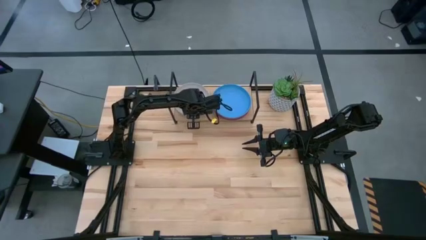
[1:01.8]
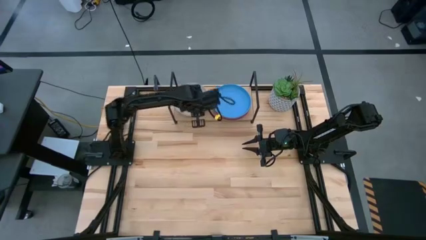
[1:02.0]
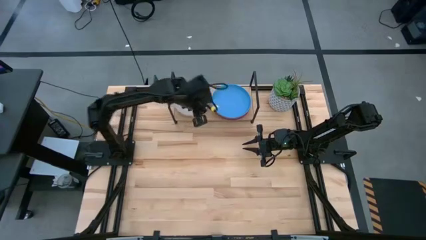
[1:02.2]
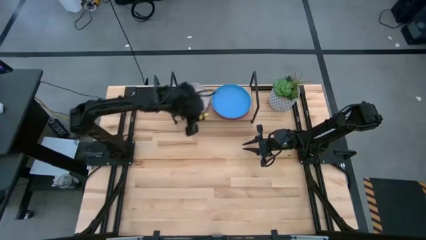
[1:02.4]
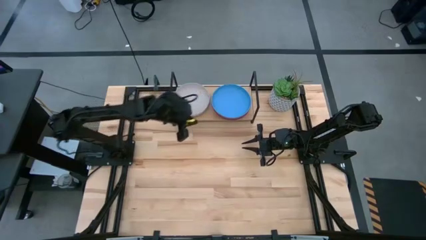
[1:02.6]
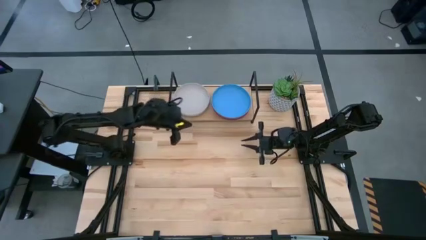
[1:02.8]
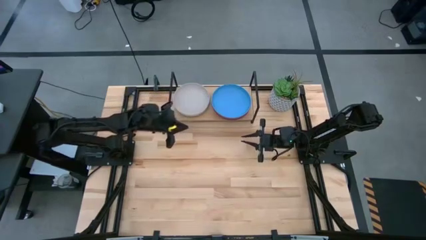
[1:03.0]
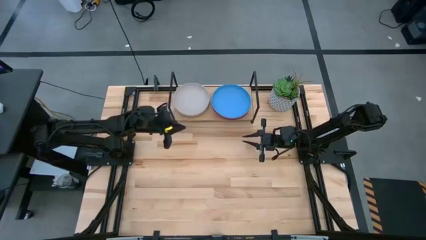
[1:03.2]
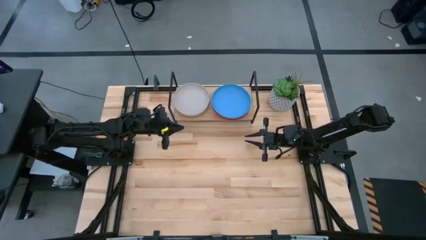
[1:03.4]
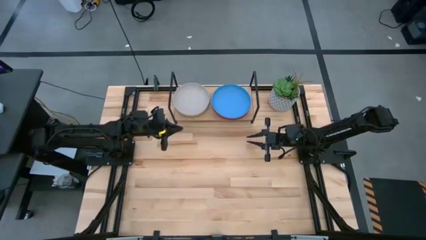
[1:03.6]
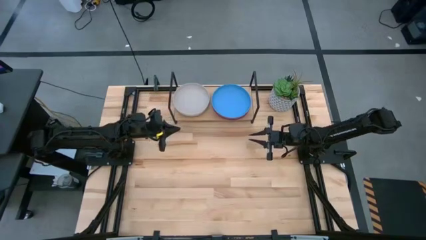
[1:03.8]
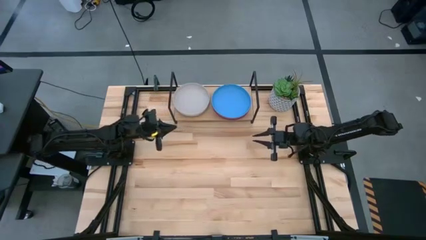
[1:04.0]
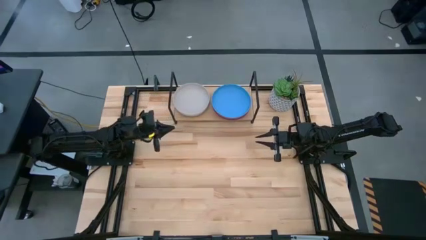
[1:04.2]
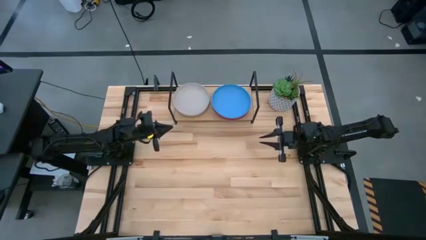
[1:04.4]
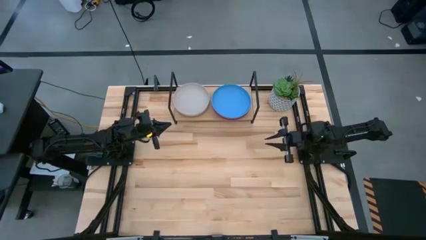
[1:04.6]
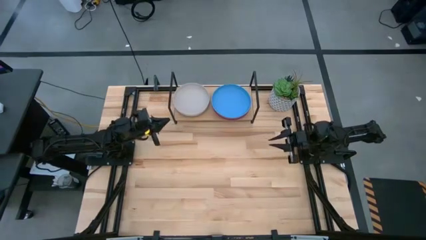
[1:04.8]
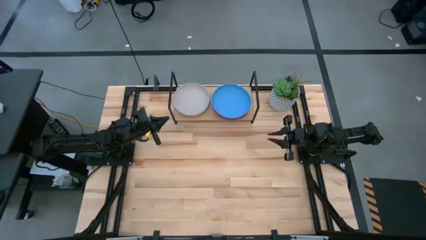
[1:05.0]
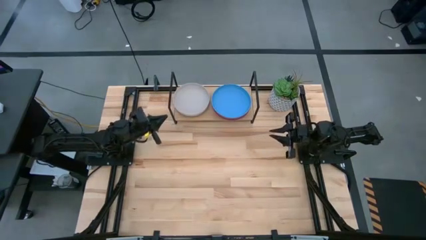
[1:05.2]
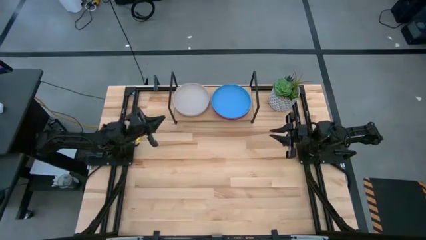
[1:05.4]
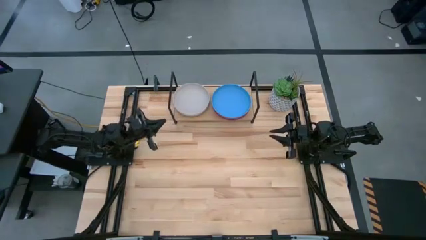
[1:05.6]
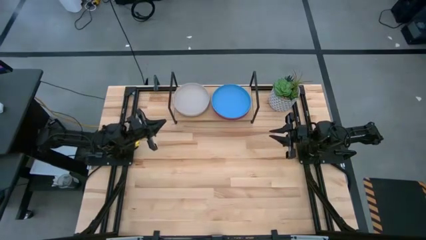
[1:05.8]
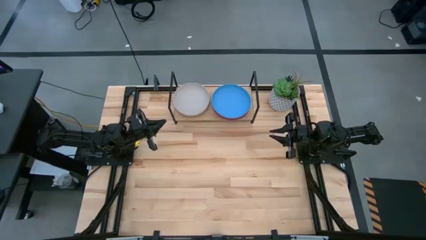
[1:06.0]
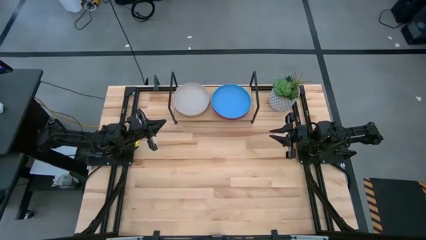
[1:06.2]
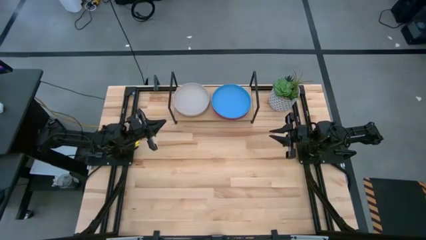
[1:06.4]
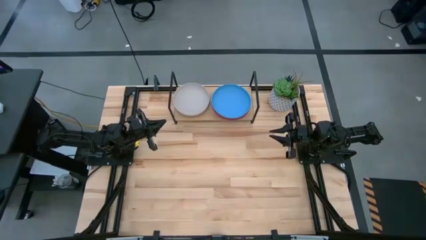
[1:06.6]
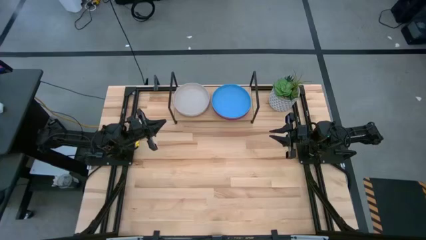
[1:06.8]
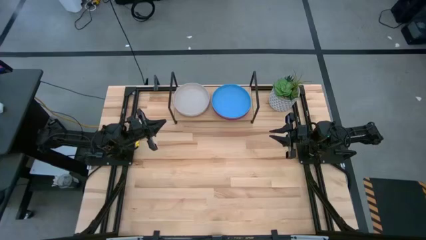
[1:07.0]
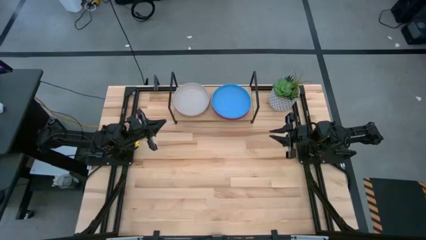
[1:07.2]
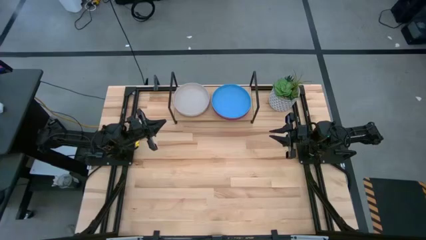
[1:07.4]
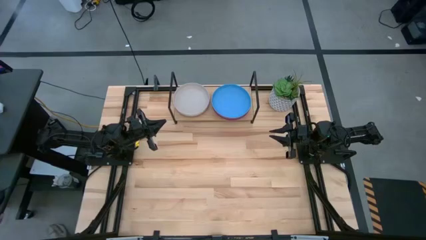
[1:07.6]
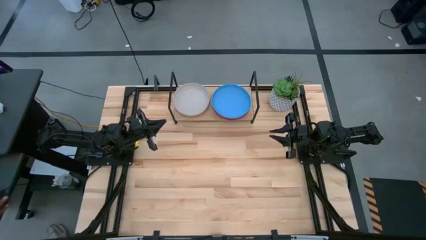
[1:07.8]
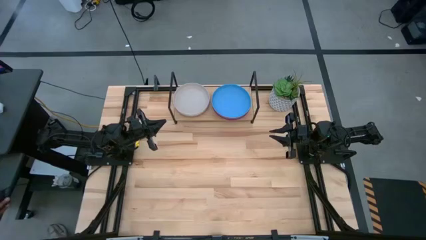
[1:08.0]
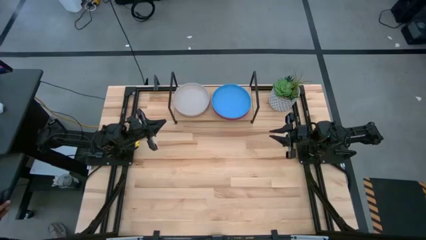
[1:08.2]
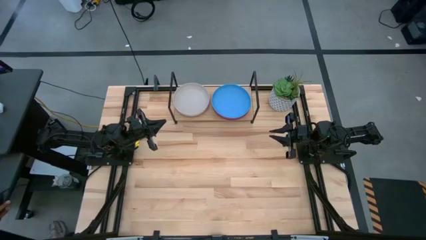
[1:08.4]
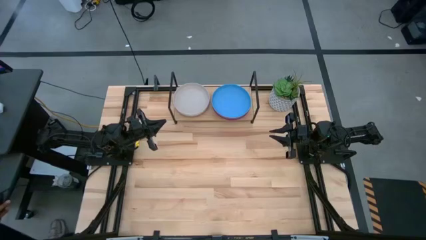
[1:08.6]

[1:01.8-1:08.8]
Task: Place and stack plates onto a shelf
Return to Home Position

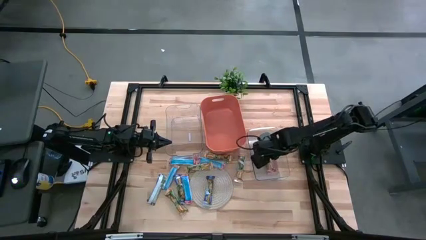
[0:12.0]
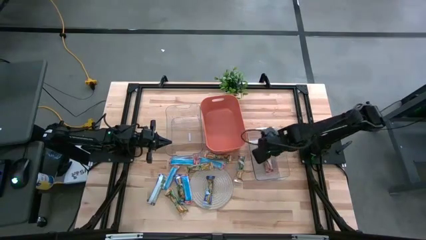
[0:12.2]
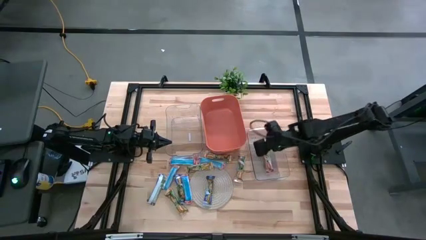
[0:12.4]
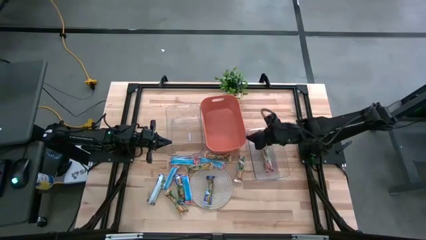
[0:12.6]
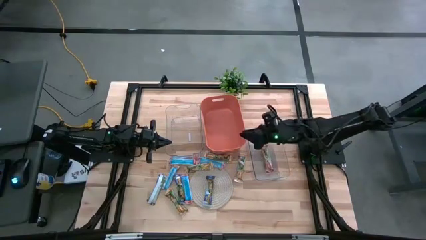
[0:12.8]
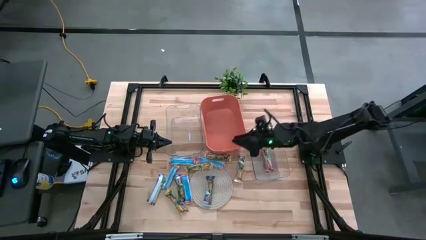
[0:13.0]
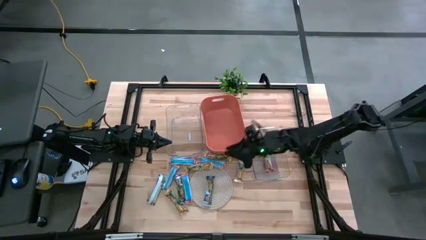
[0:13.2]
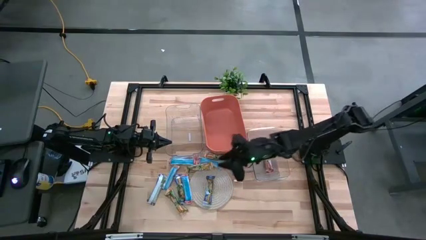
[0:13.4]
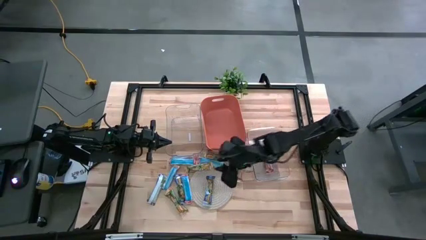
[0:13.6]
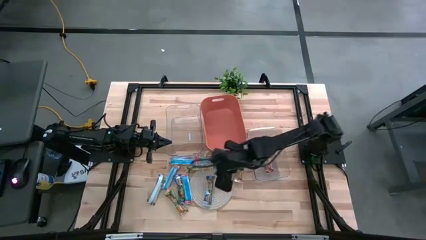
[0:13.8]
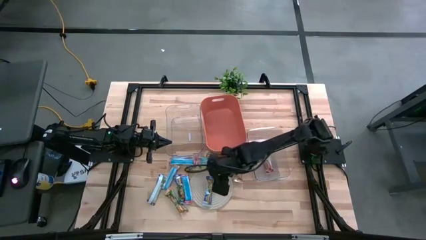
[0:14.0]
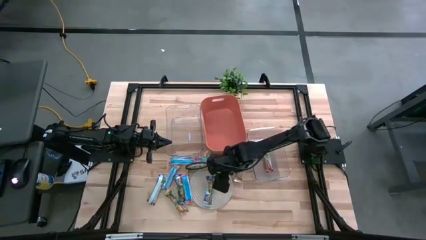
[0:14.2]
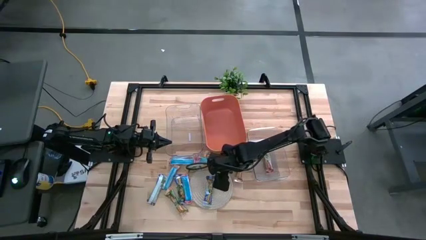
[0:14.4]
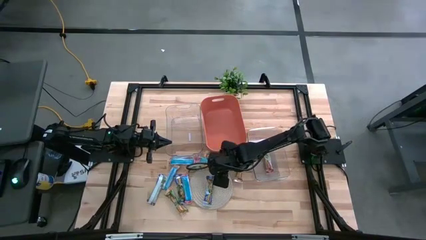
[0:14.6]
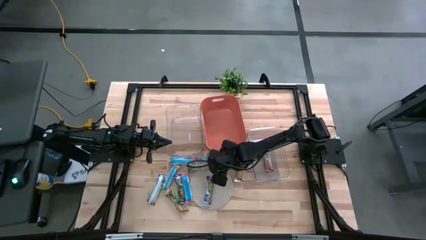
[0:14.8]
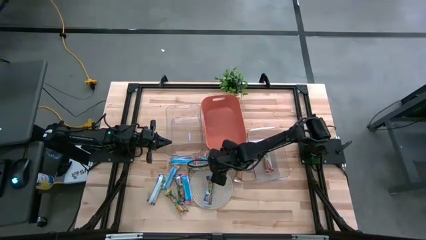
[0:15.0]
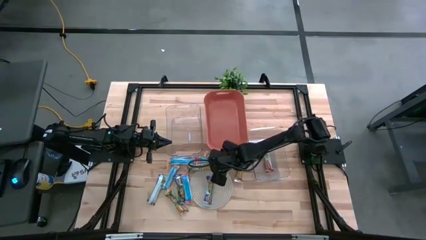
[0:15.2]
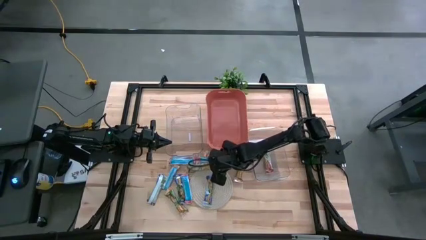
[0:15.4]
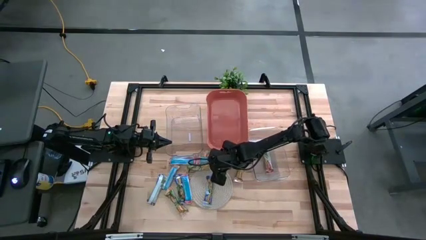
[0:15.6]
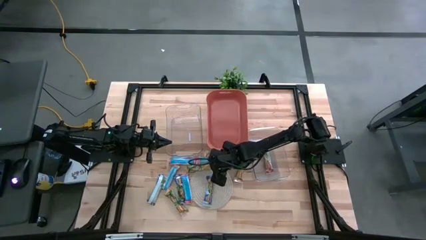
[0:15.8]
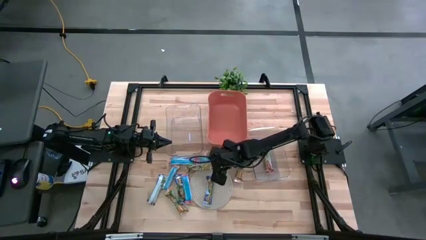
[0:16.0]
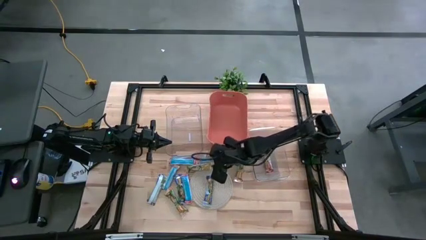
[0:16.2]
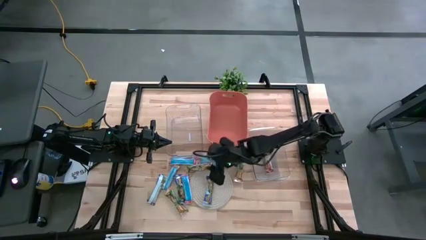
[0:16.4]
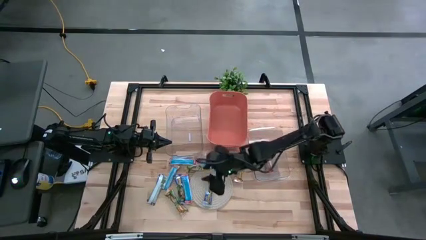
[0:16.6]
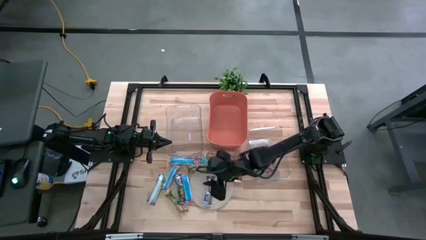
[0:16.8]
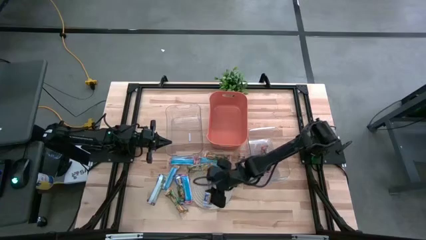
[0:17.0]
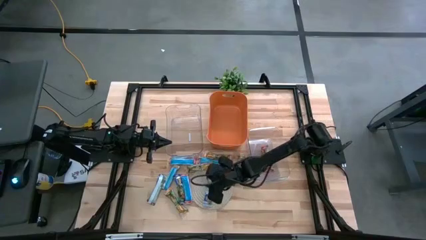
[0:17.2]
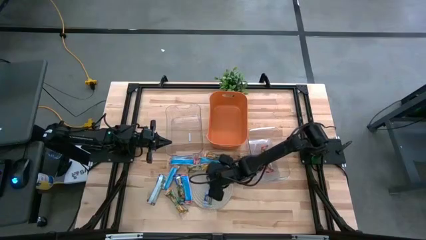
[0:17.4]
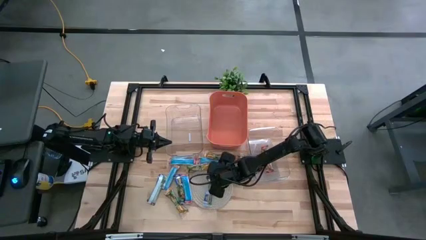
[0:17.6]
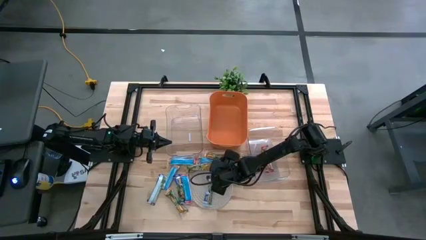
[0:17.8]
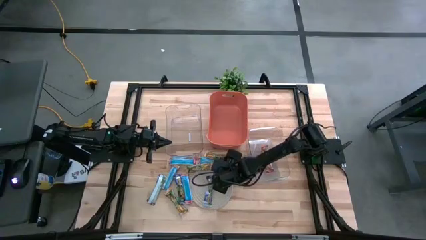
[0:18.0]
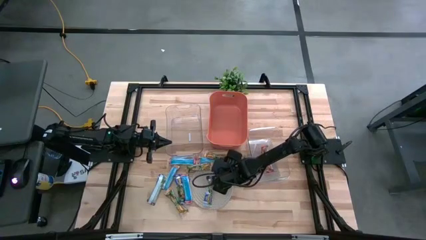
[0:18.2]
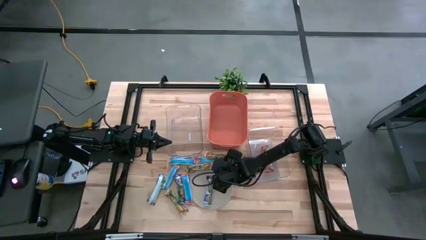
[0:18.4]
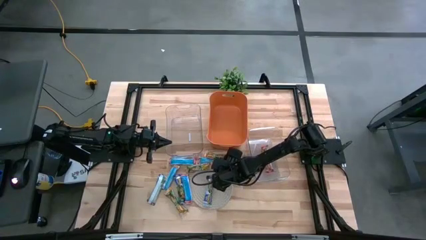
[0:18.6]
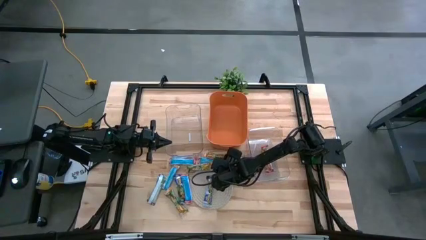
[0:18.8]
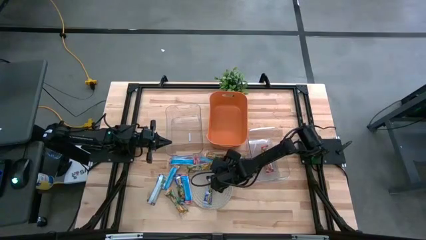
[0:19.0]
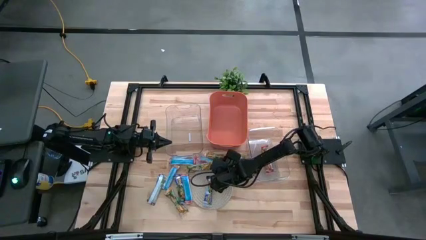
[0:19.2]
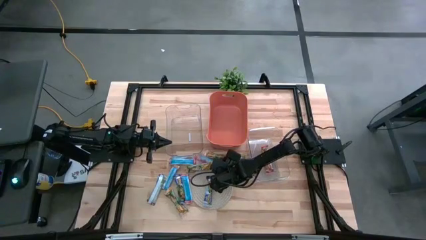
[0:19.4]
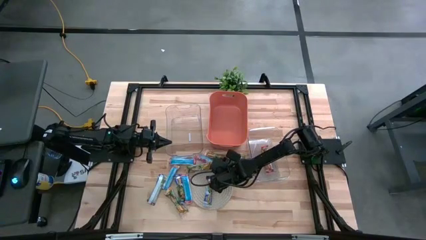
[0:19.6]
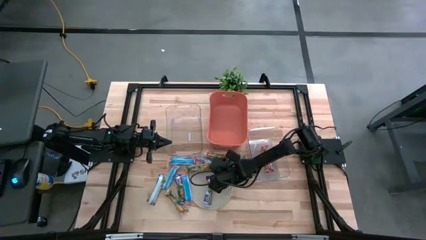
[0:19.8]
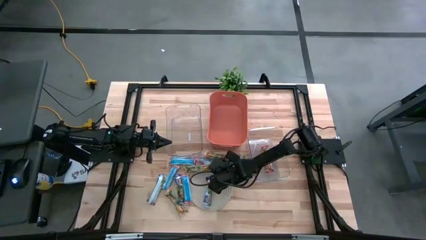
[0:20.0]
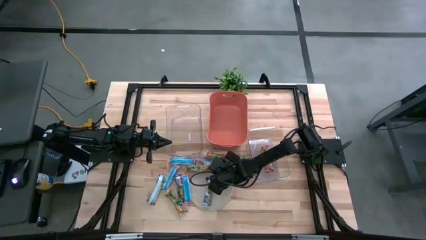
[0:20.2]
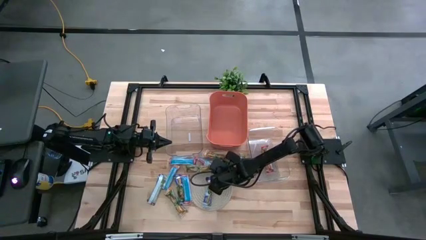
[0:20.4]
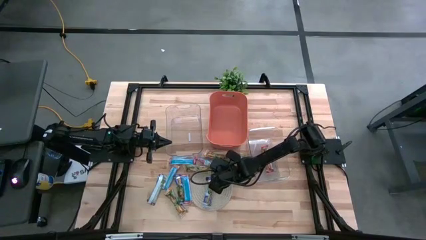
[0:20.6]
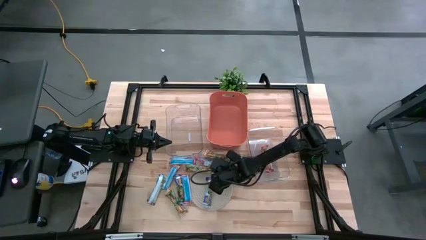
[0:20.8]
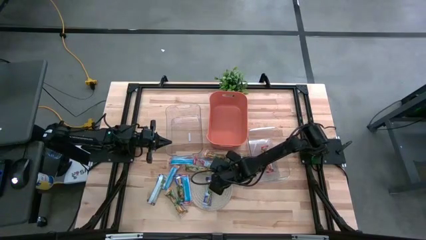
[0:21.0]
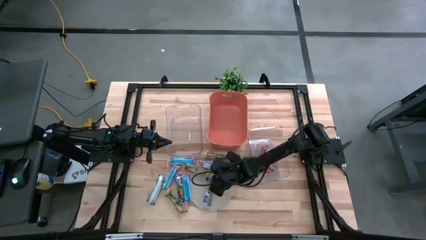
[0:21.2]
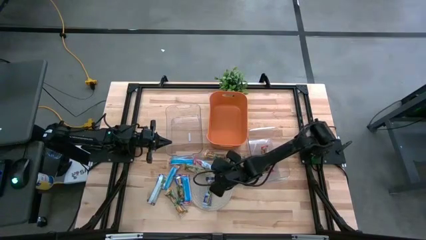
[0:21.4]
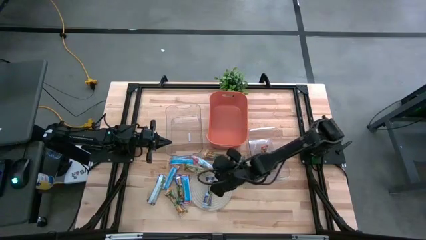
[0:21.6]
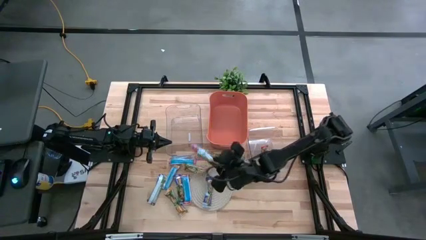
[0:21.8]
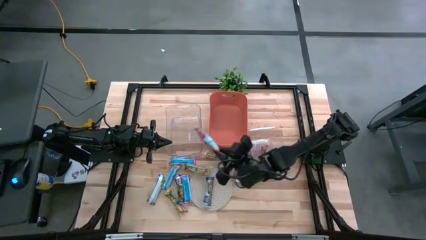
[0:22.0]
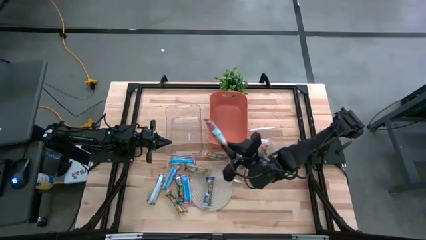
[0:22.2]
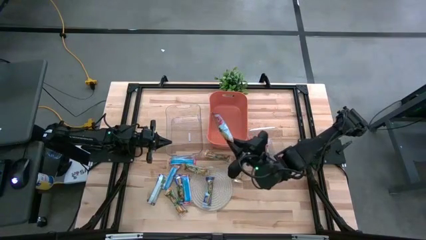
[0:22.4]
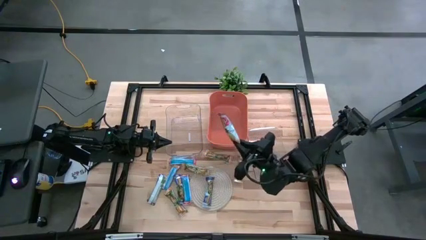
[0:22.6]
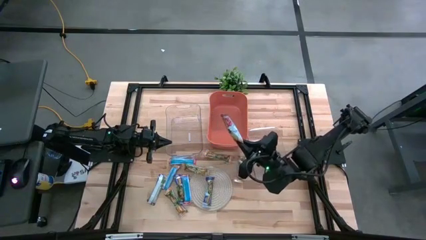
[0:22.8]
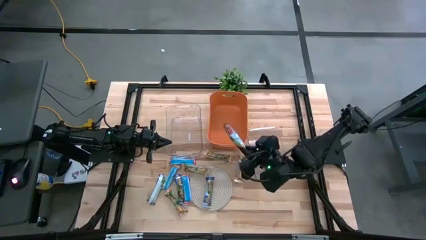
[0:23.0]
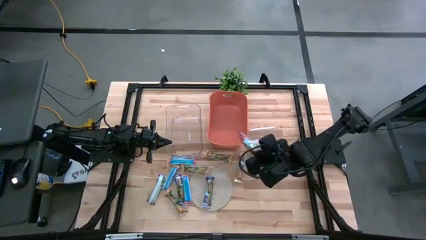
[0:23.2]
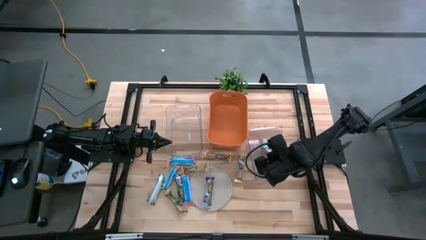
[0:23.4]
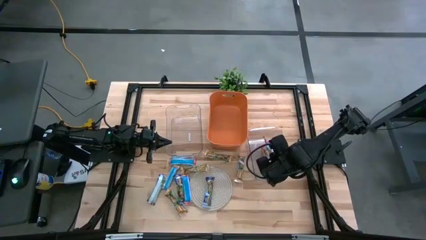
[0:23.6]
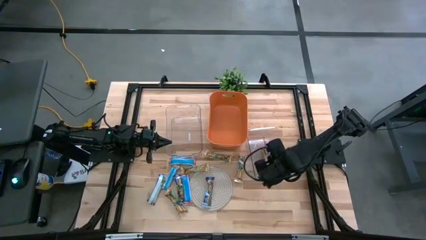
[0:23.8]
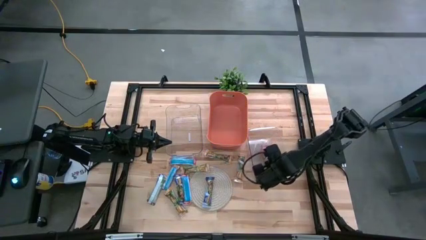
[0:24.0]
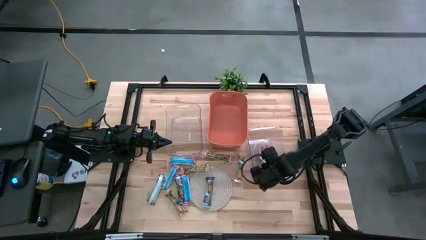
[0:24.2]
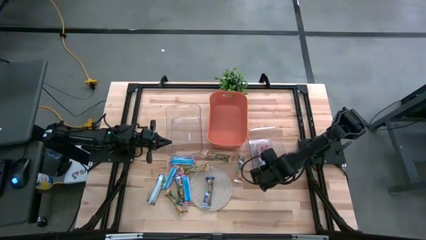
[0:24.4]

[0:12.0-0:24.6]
Task: Pick and place Granola Bars by type
Put the red granola bar into the right transparent bin
